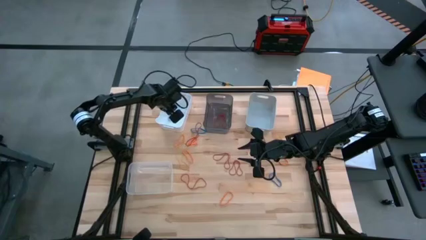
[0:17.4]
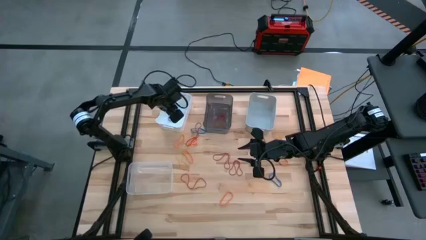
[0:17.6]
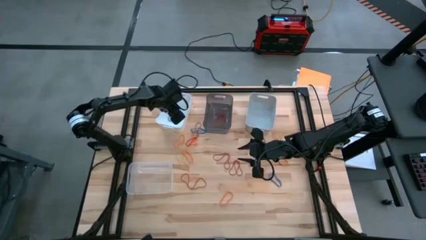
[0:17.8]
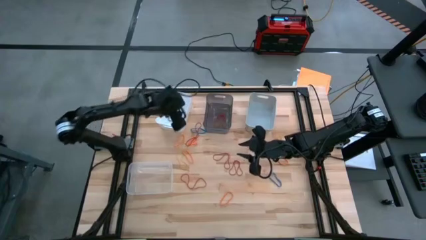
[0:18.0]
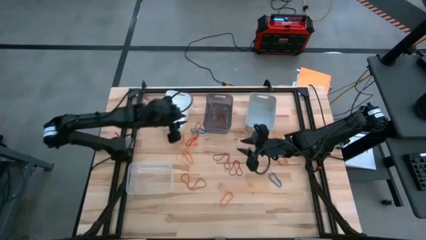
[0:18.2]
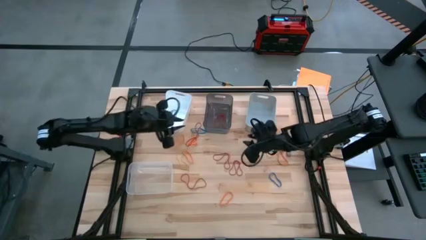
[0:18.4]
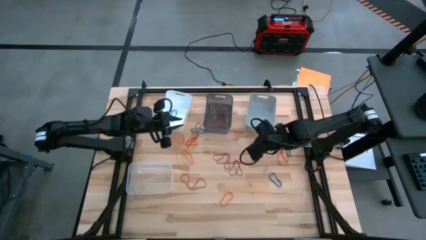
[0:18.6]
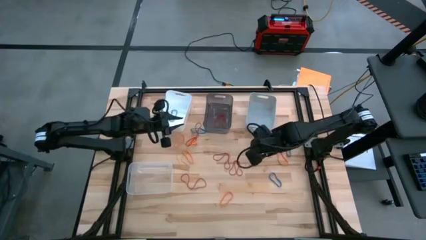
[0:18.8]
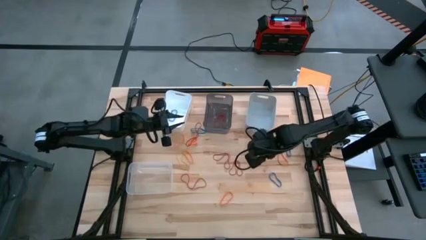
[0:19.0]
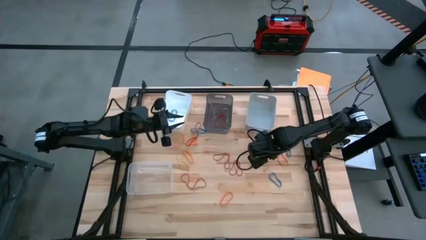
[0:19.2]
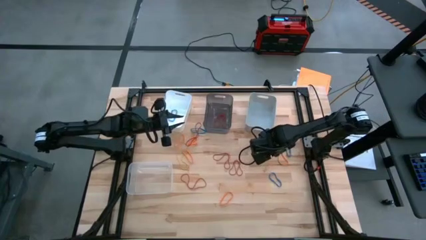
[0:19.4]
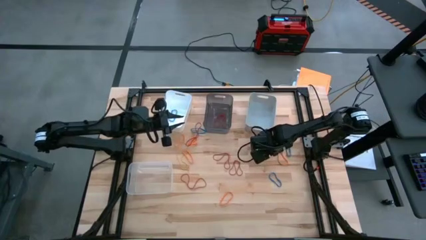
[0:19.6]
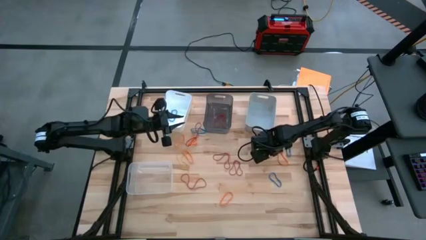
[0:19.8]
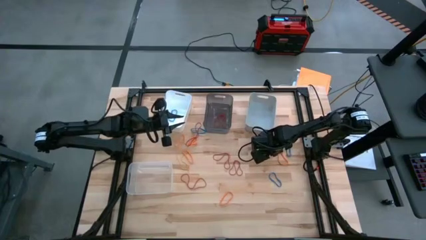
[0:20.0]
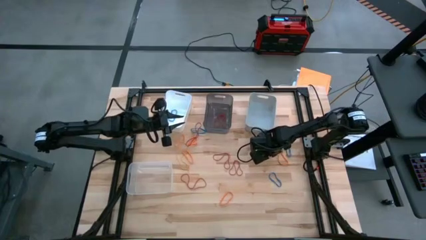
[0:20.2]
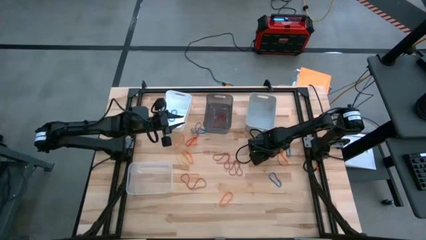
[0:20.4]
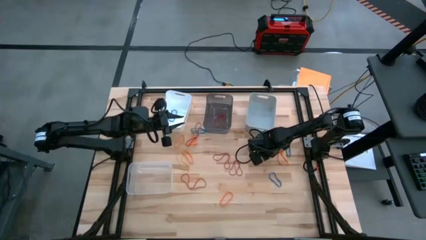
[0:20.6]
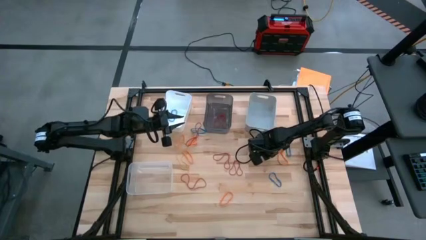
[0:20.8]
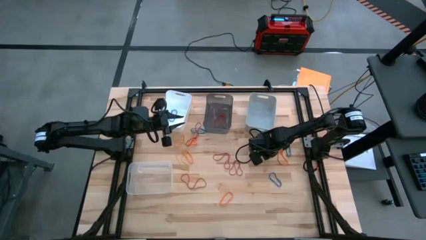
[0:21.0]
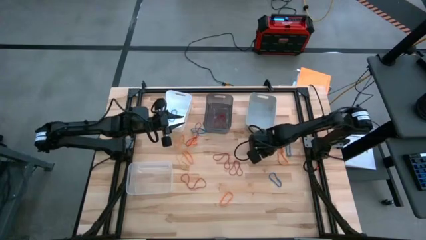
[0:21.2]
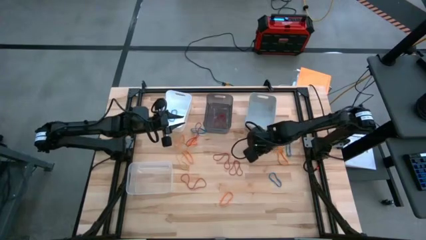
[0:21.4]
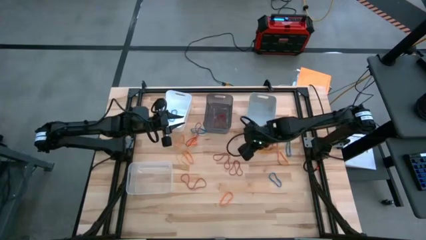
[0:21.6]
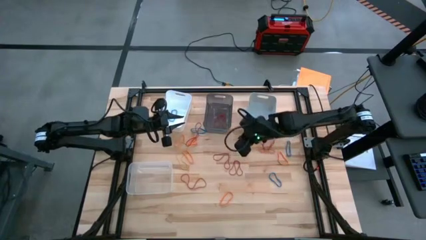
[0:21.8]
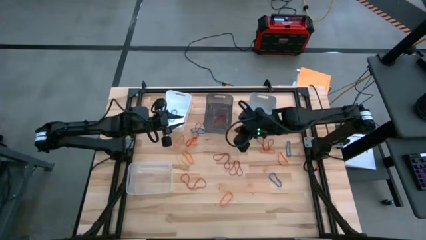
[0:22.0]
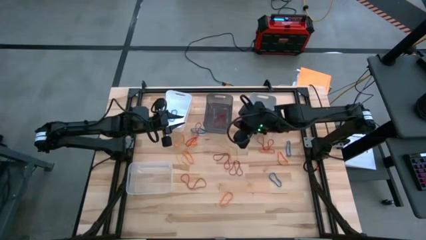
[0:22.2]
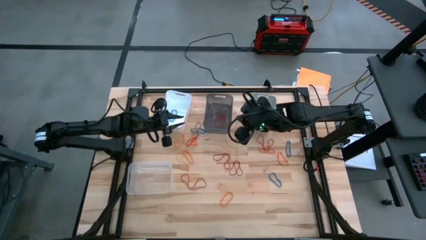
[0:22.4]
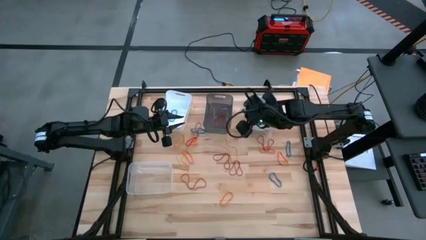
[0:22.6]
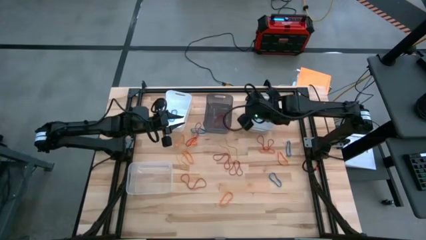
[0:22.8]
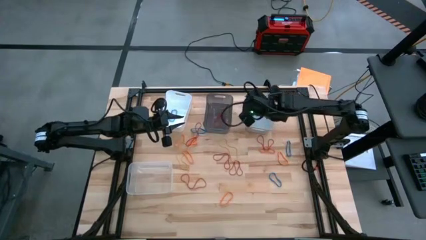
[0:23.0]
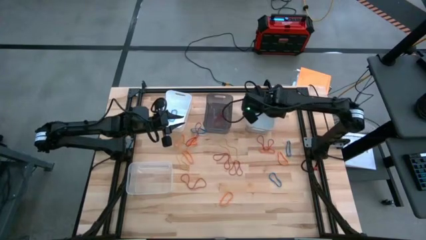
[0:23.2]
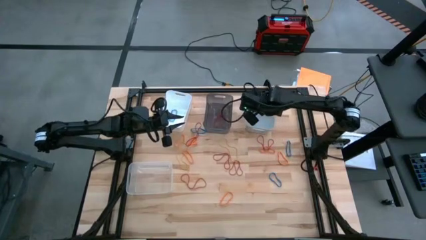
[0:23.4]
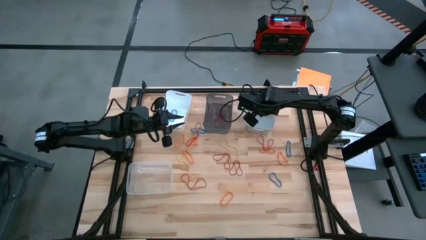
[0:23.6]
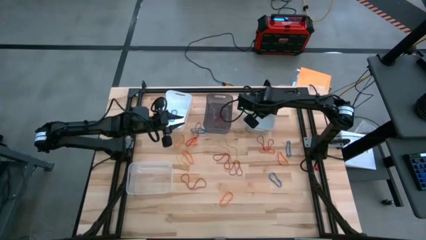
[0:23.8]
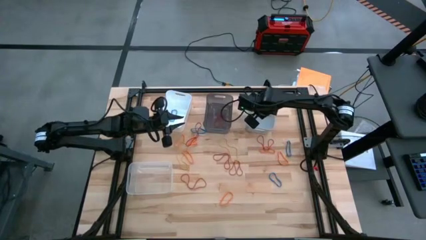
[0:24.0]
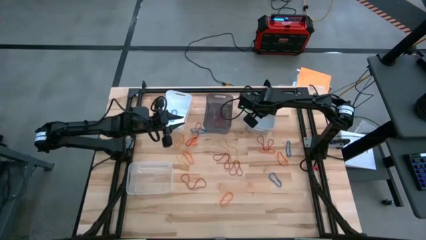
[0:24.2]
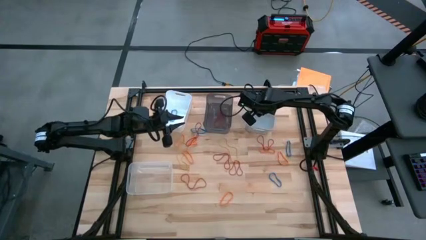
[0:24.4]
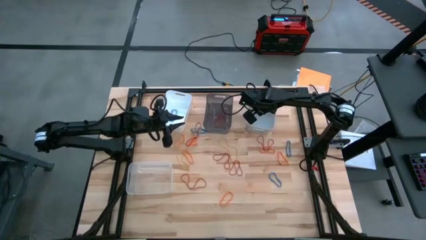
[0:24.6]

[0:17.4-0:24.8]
Task: Sort rubber bands into baskets
Put the yellow rubber band into the gray bin

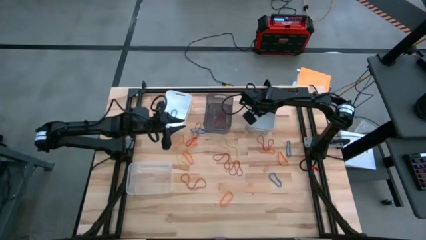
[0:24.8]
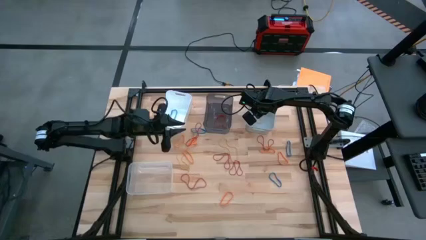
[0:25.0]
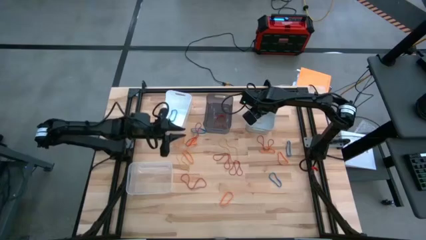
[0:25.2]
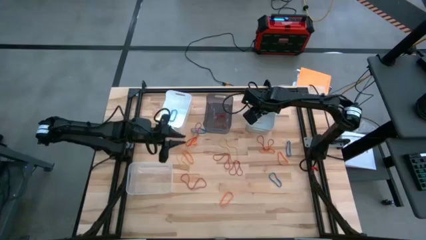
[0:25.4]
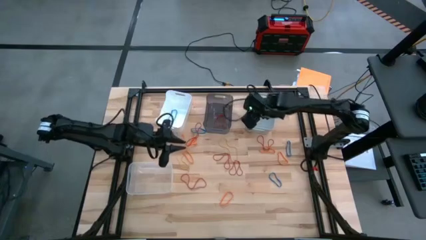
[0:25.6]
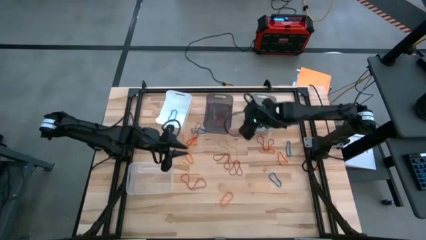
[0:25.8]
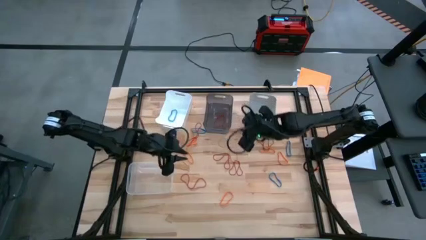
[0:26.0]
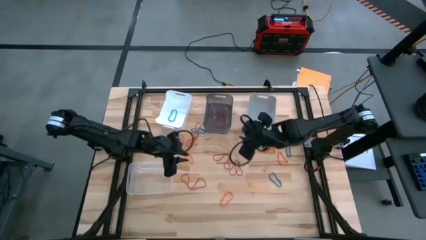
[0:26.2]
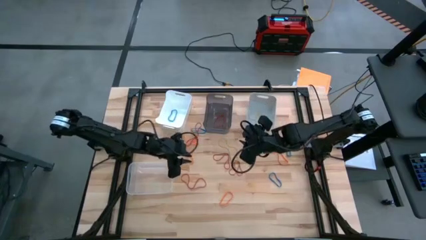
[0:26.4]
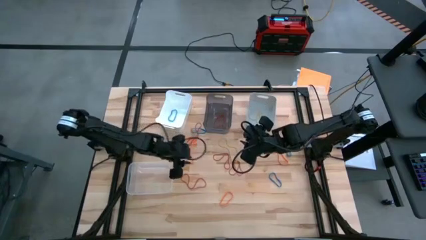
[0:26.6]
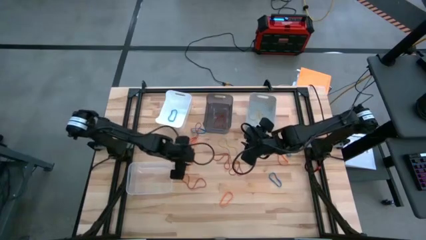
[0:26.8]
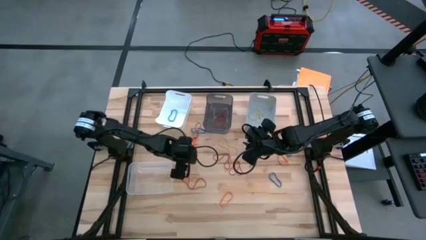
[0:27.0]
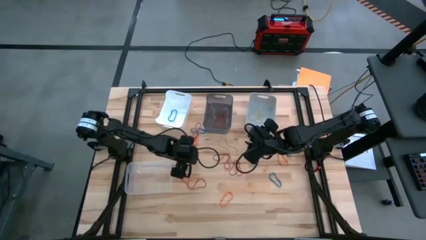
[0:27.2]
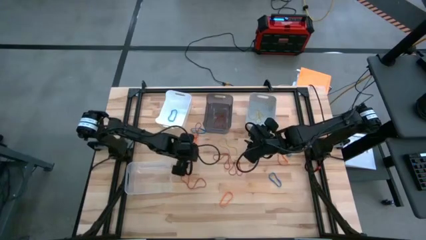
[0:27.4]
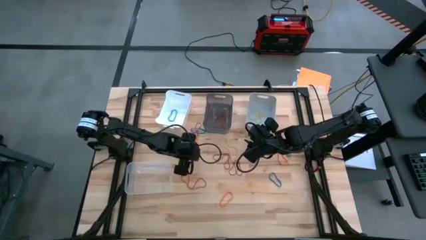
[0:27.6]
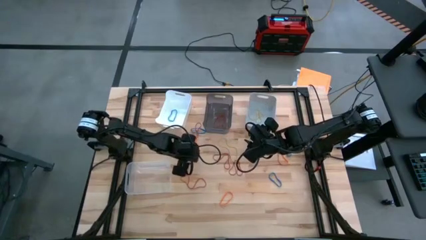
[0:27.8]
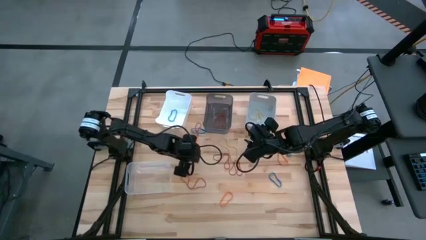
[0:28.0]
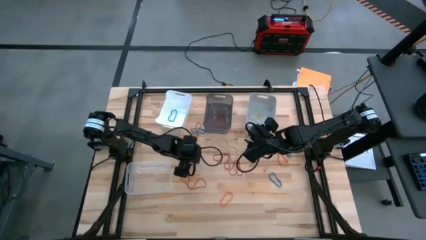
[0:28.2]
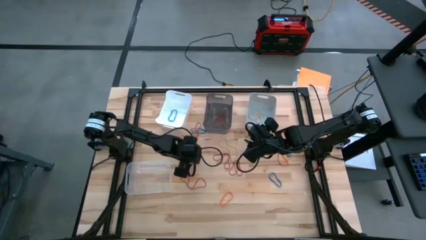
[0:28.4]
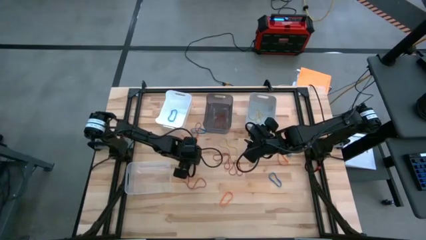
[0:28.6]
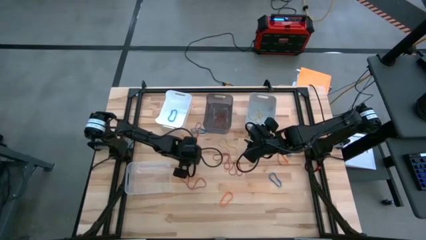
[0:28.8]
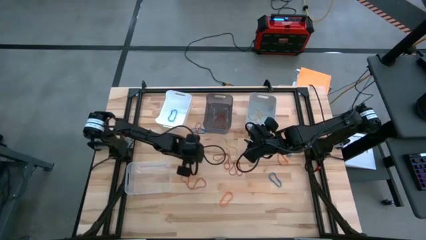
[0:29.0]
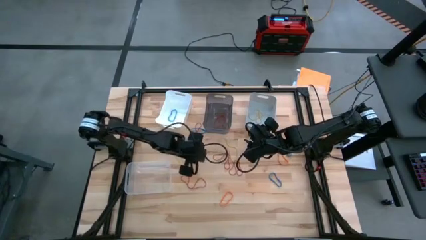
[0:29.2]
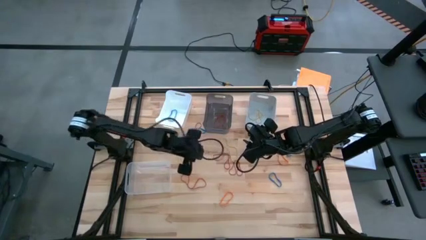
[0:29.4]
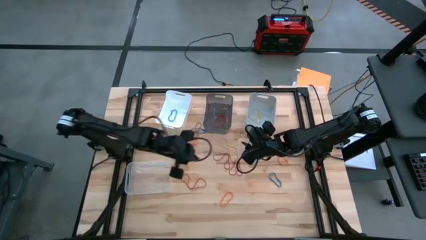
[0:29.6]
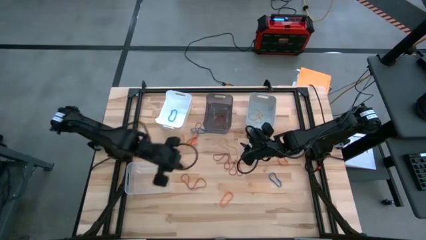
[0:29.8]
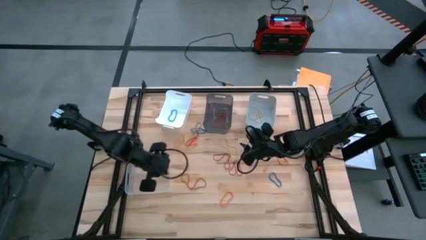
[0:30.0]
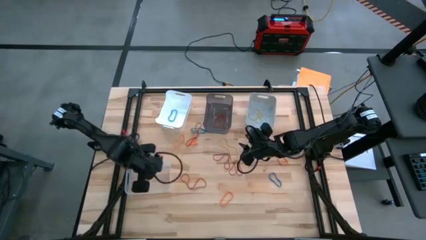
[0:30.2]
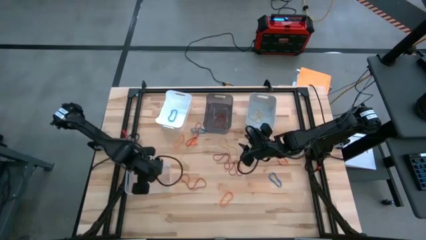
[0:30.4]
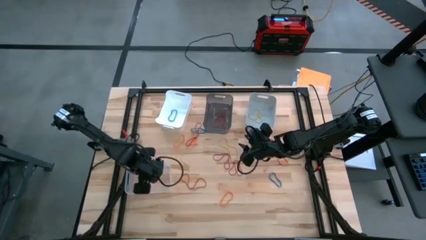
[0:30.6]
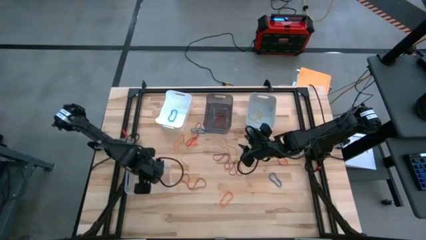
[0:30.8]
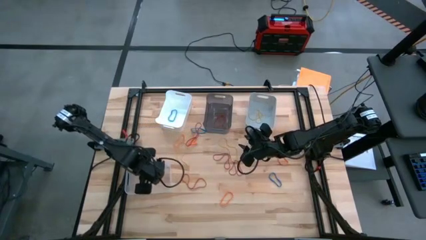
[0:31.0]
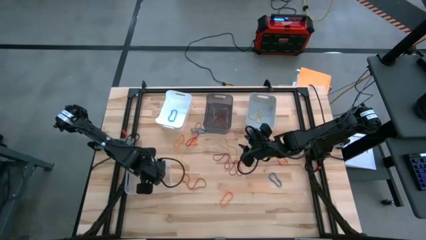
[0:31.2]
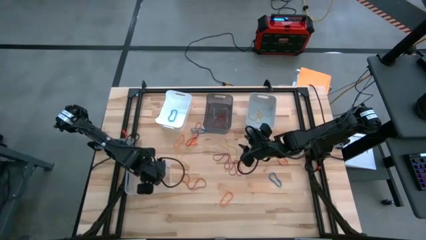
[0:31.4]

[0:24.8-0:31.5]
Put the orange rubber band into the transparent bin

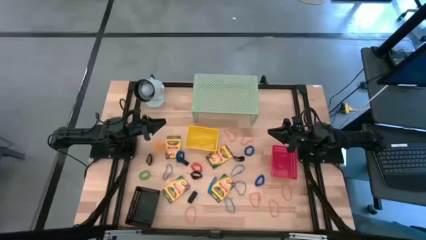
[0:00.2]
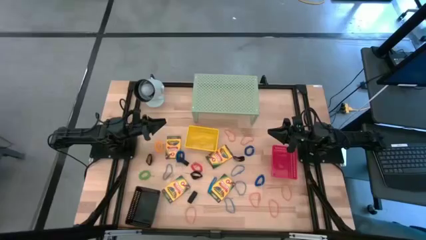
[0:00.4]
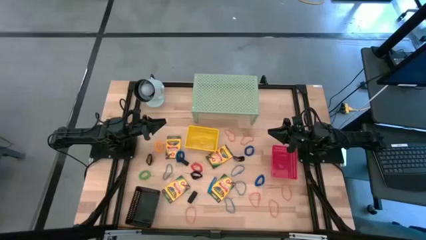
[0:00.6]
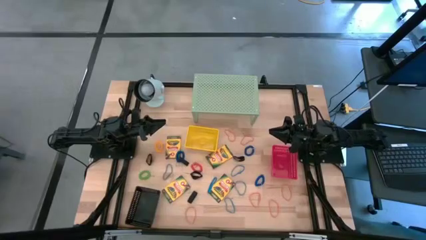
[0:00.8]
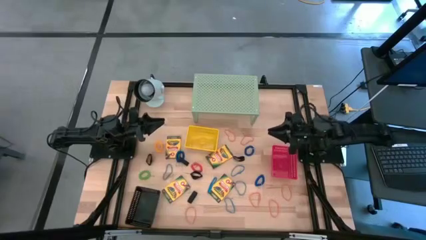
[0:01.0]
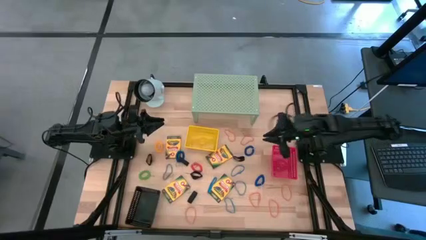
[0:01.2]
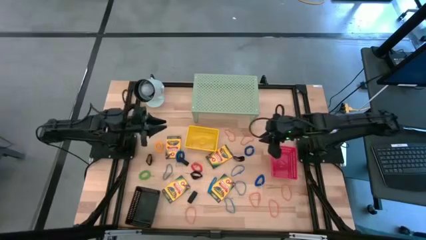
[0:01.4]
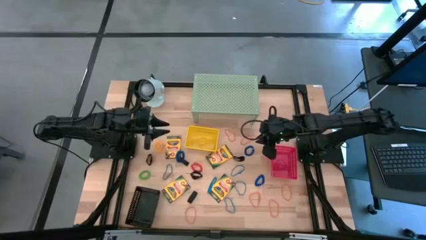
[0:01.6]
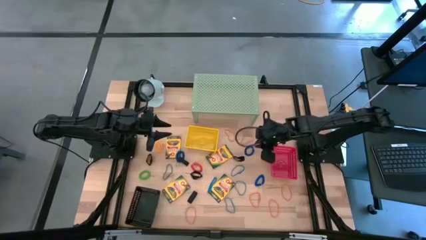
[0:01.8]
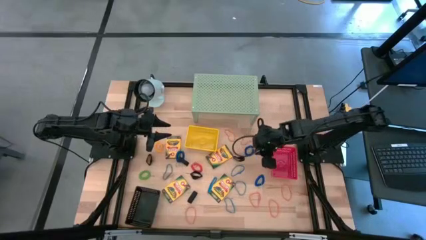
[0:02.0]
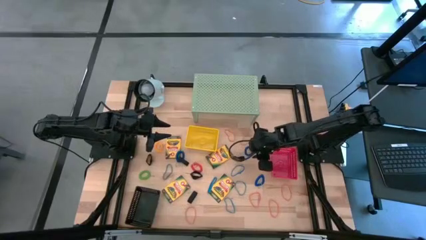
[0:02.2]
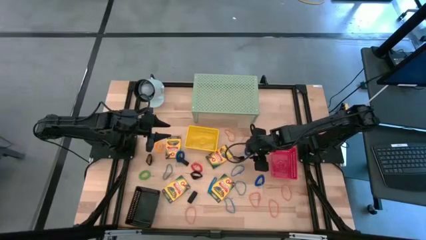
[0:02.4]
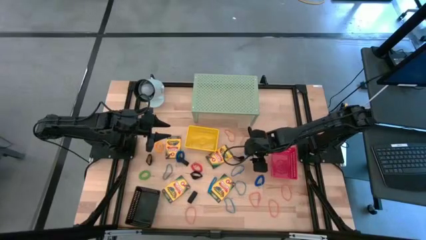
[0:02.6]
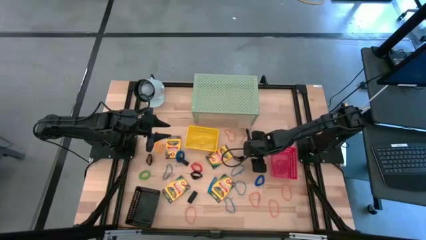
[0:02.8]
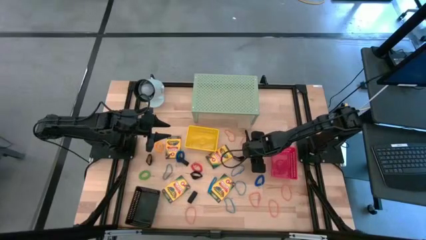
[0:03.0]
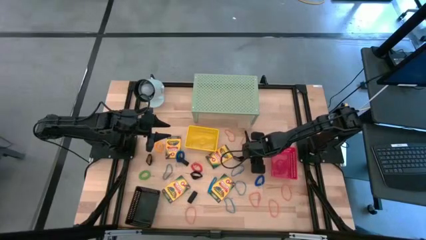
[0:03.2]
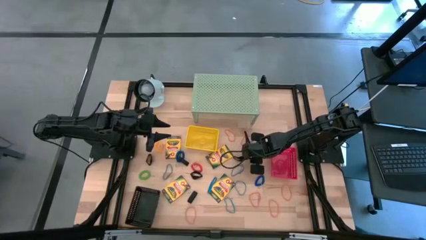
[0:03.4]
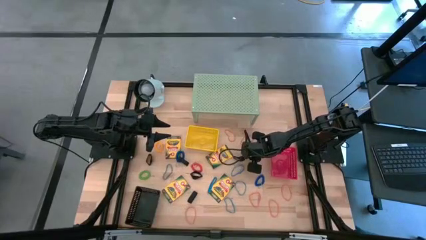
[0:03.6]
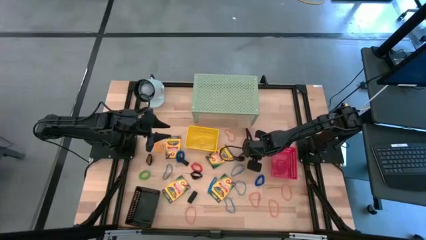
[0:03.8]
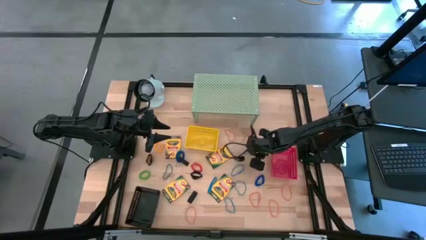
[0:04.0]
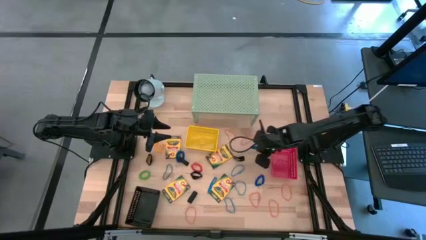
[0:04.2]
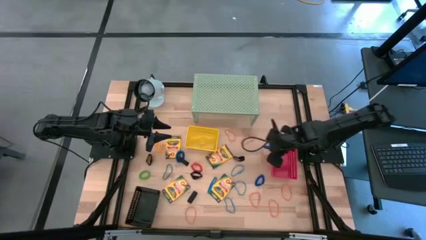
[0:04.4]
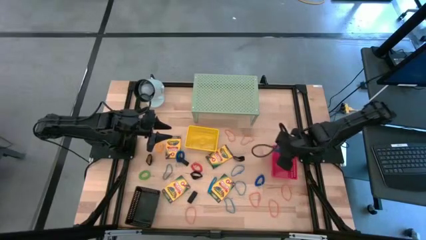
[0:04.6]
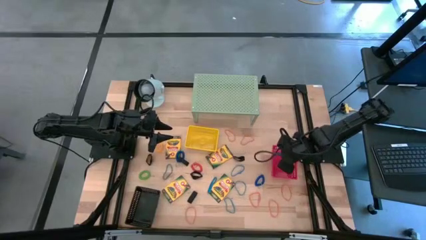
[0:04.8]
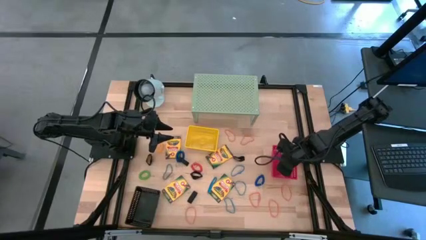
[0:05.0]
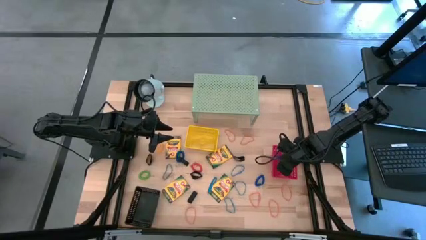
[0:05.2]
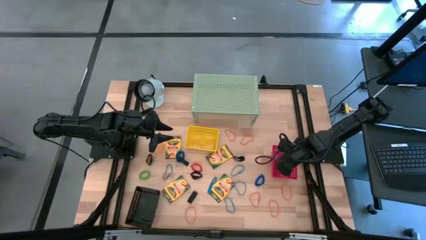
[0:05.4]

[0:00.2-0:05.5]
Task: Pick & Place Office Desk Supplies
Put the blue spring keychain into the red bin
